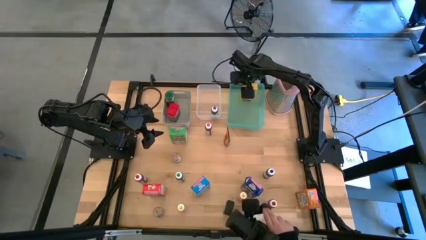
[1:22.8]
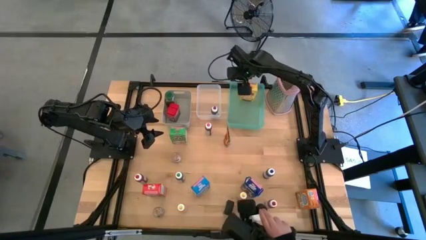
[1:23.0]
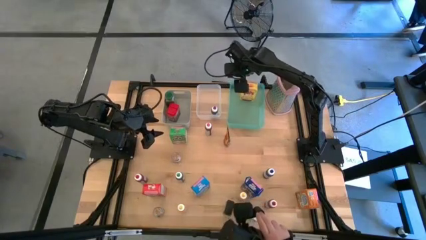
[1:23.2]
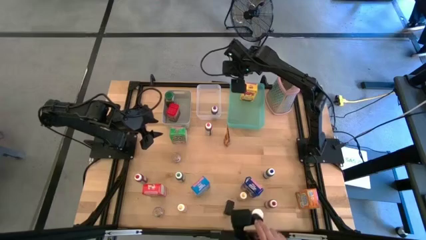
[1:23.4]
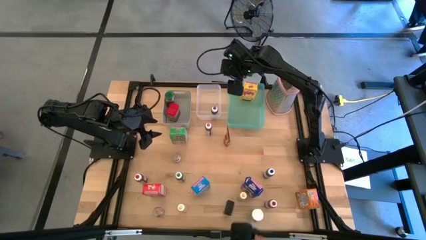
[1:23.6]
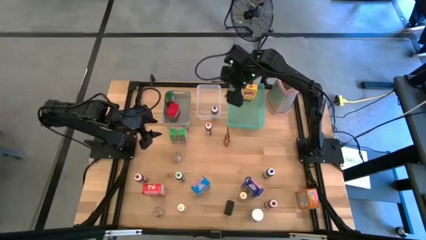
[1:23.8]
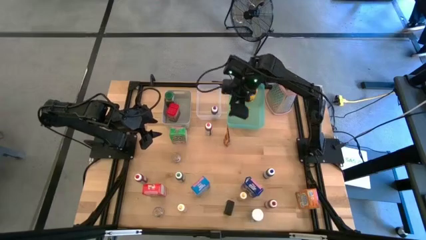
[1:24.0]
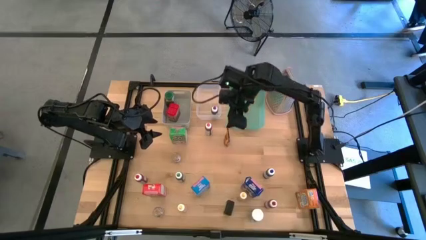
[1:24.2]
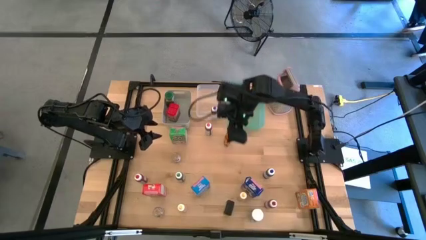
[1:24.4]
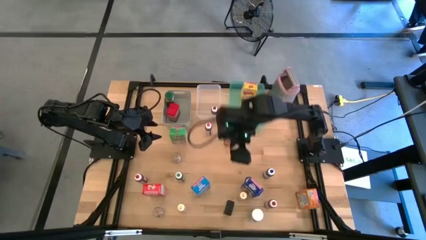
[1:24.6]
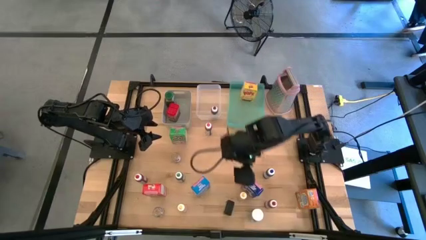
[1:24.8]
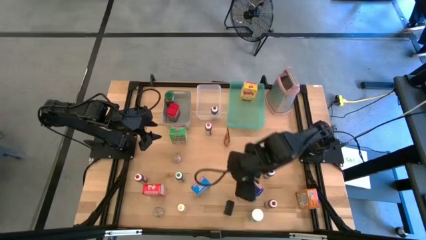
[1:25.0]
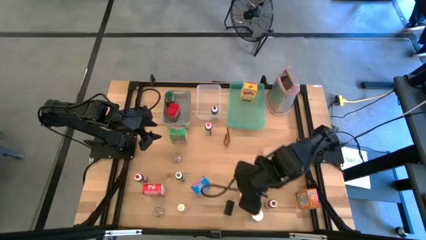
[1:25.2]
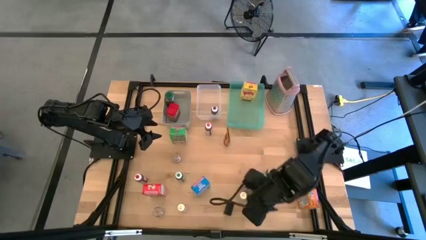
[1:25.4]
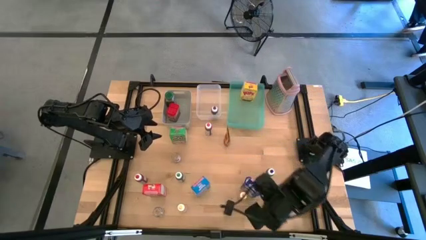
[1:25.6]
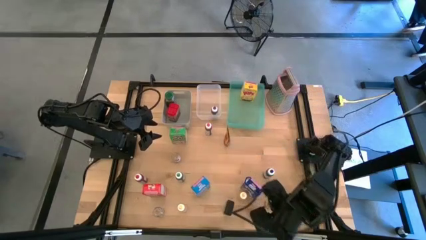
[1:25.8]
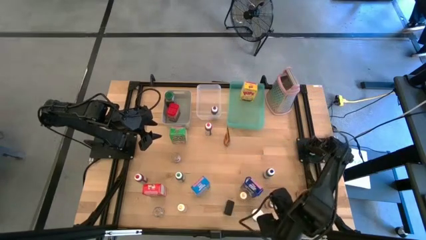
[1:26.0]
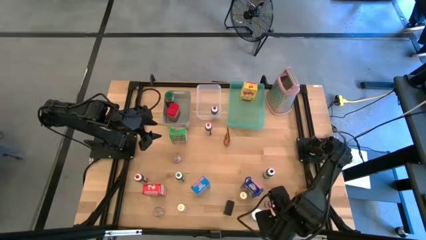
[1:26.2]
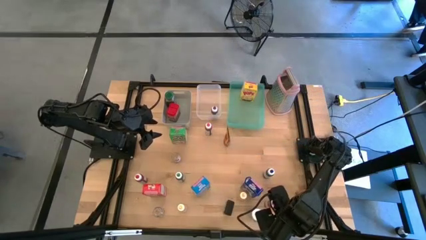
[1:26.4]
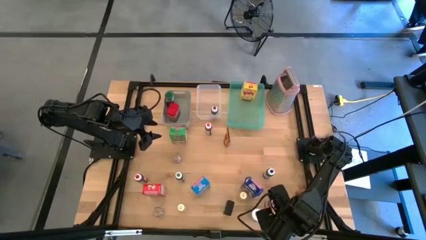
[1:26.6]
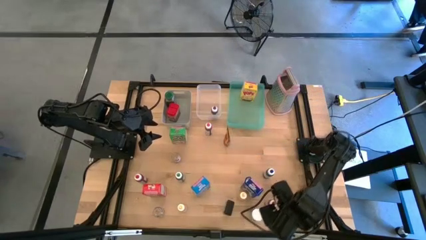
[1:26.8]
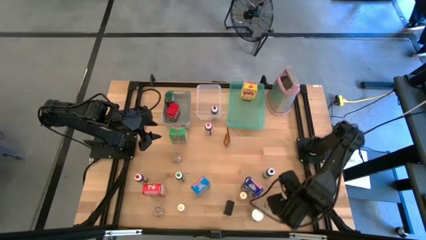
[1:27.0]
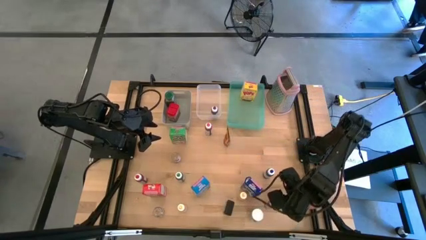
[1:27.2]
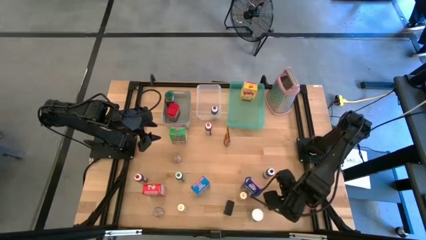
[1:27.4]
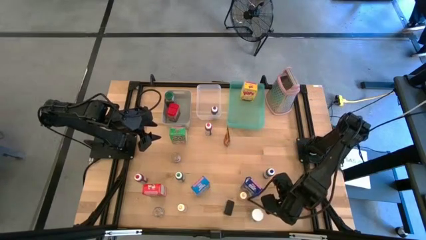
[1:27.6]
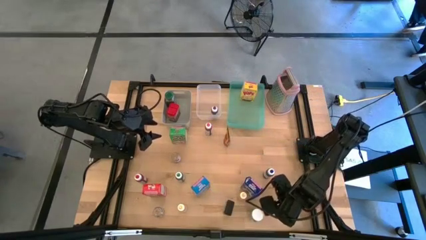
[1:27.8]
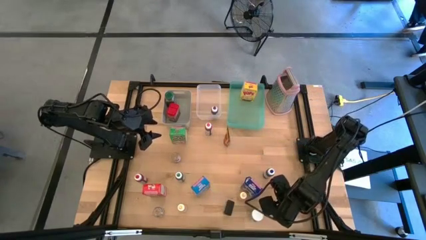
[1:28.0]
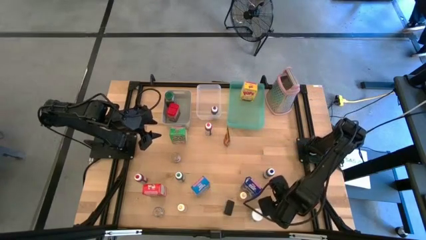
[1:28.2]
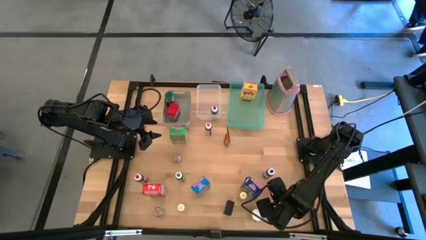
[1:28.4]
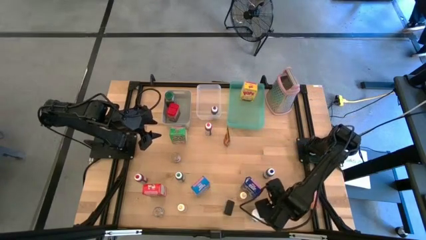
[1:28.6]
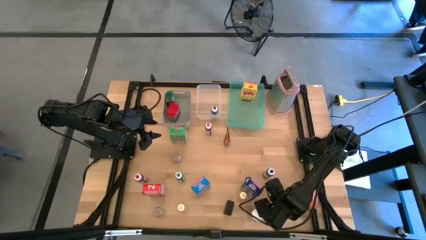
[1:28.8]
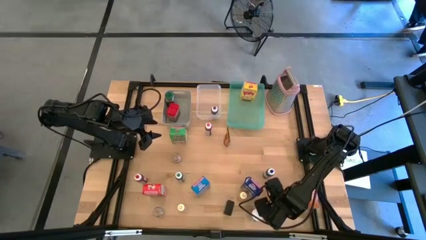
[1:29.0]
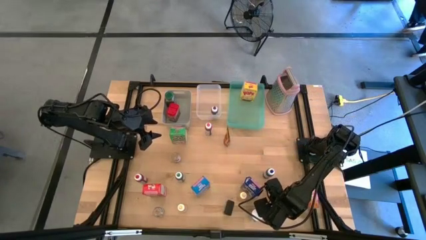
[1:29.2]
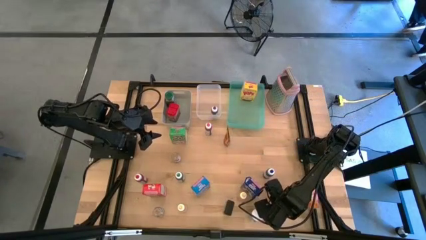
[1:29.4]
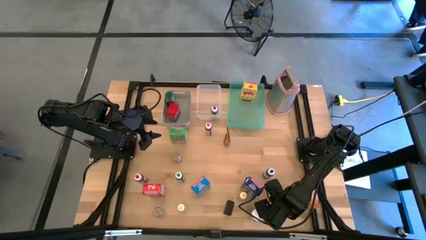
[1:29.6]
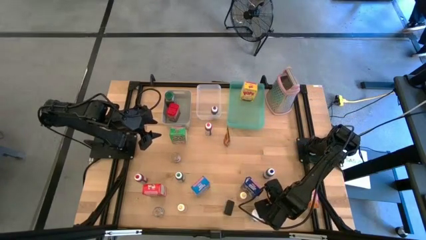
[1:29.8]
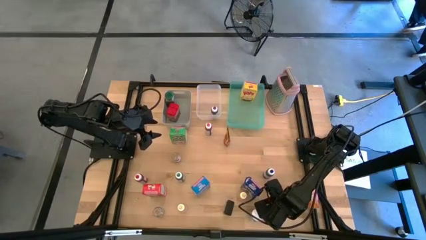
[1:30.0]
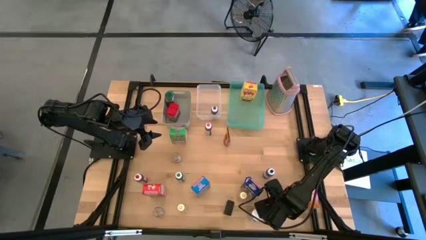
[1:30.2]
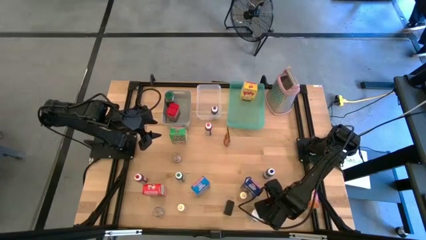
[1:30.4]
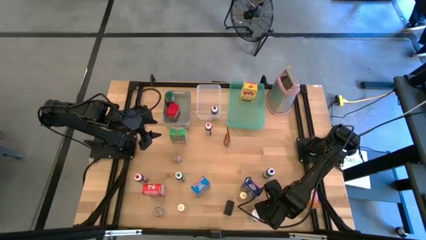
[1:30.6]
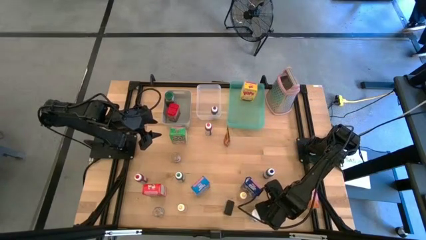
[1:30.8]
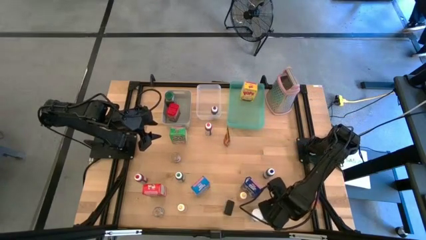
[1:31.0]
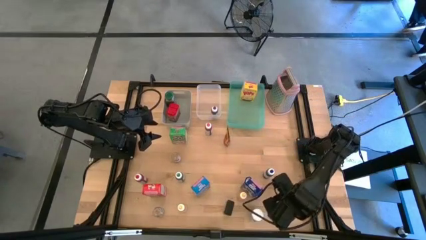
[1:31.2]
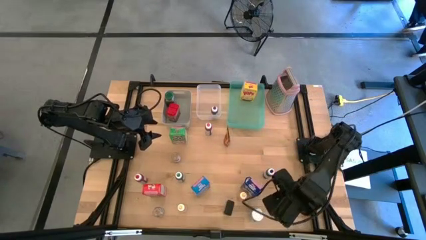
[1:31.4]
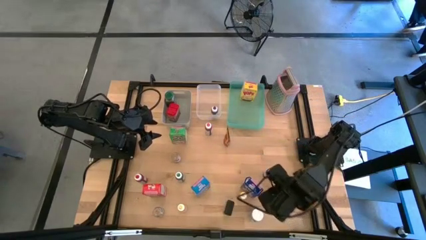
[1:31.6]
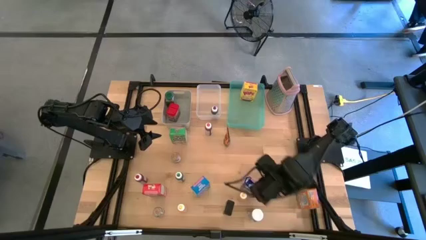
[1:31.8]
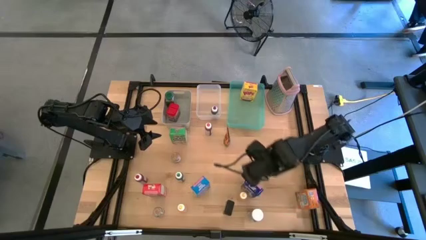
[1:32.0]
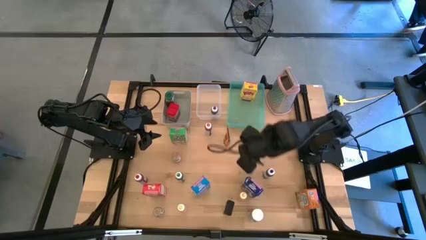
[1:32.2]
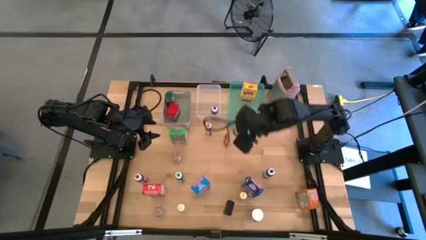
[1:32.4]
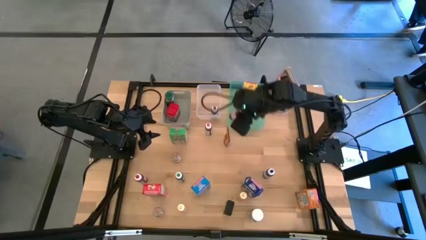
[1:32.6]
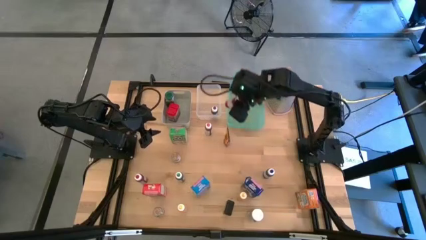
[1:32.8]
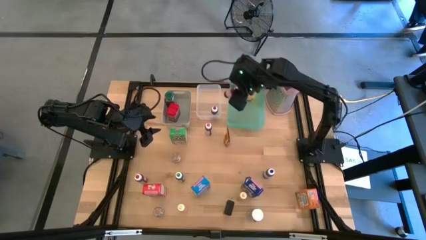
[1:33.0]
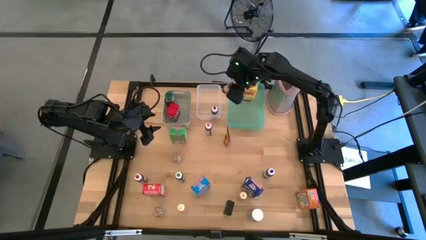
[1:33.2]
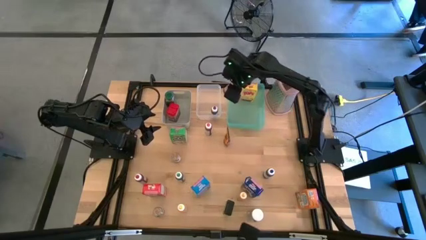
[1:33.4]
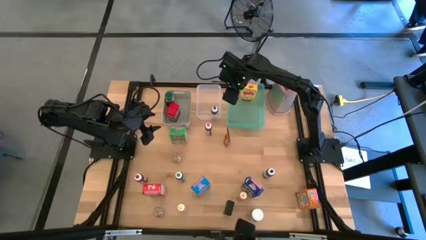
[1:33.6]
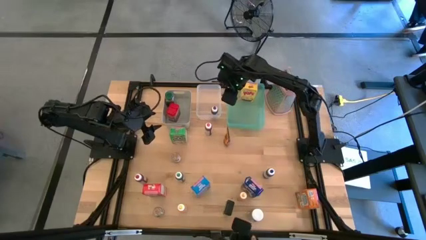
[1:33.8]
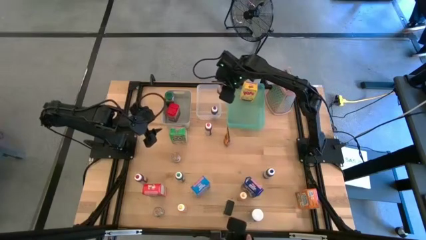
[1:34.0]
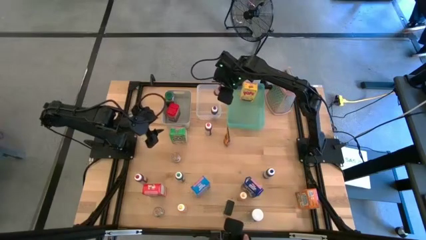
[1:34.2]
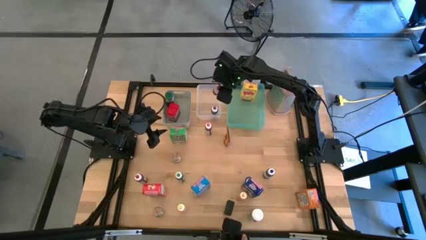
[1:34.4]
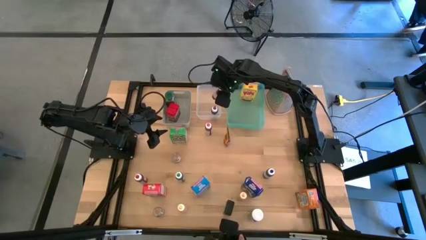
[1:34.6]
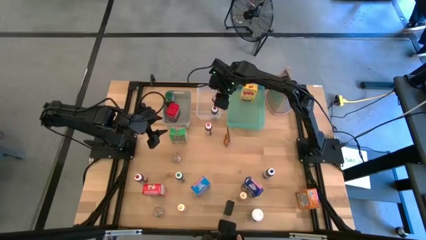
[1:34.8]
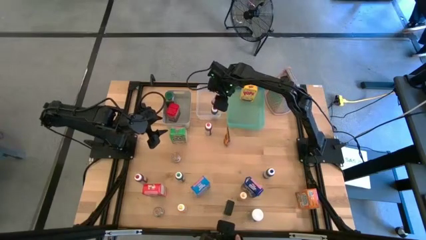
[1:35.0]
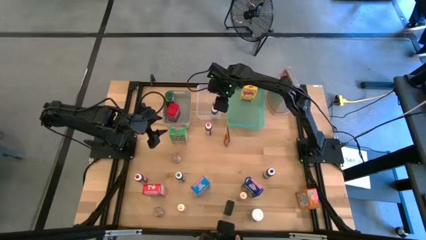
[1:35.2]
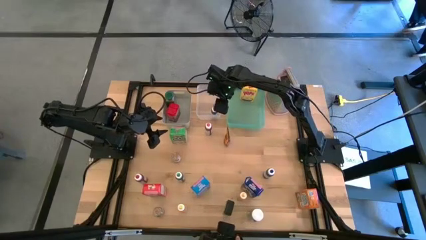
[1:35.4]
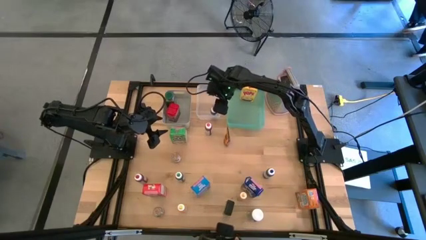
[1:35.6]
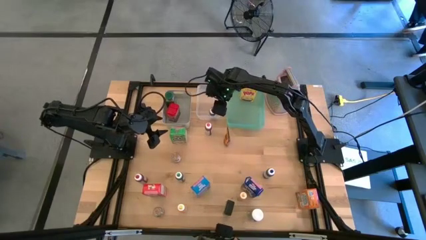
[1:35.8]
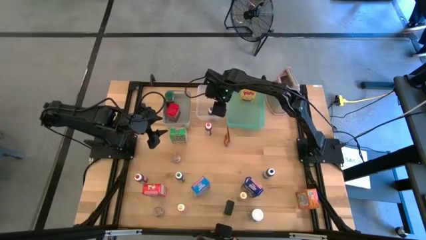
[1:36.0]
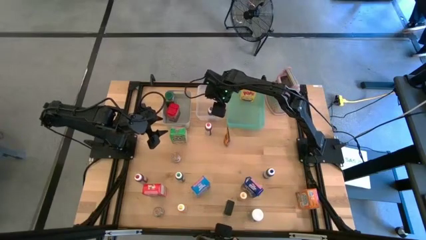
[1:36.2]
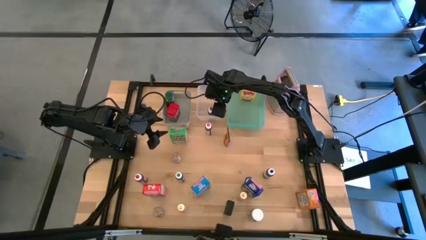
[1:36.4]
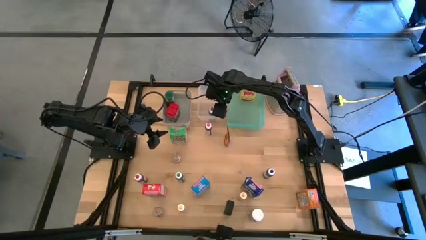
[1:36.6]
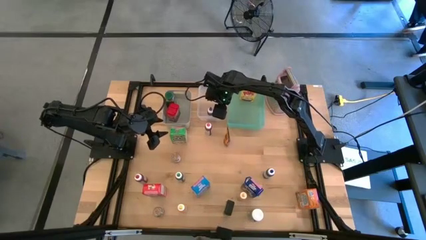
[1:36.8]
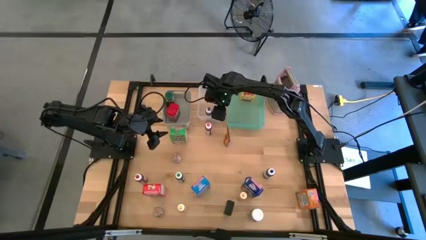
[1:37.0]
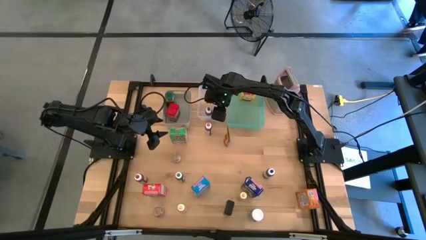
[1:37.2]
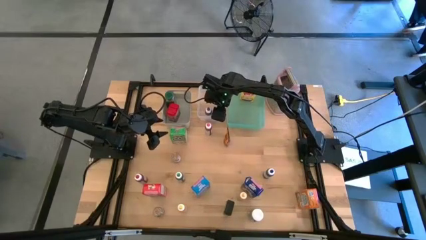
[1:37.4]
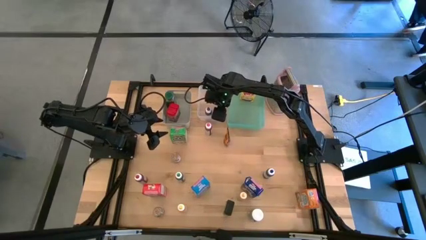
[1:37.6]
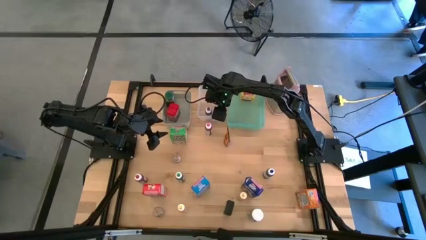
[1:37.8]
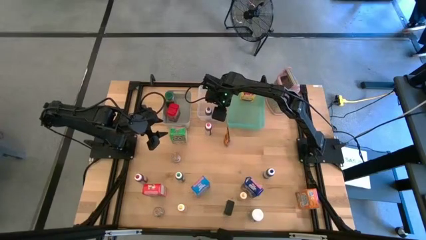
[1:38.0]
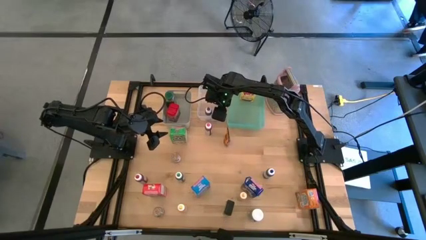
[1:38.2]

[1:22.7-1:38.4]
Task: Pick & Place Kitchen Items
Put the right red food coloring bottle into the transparent bin
